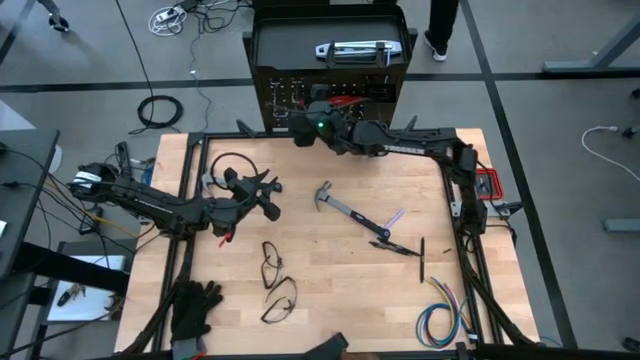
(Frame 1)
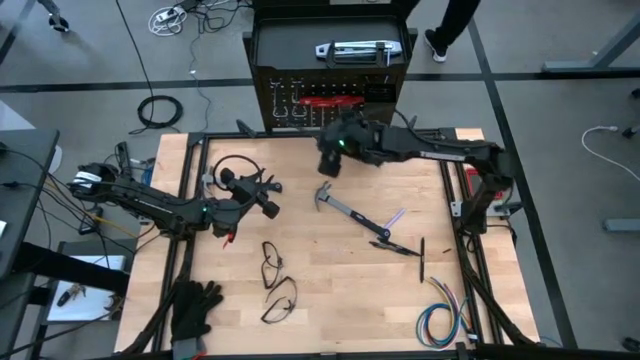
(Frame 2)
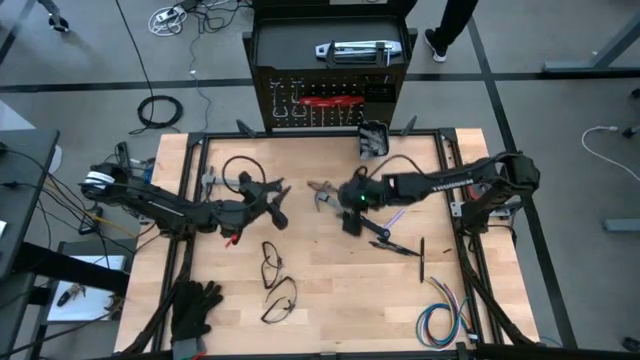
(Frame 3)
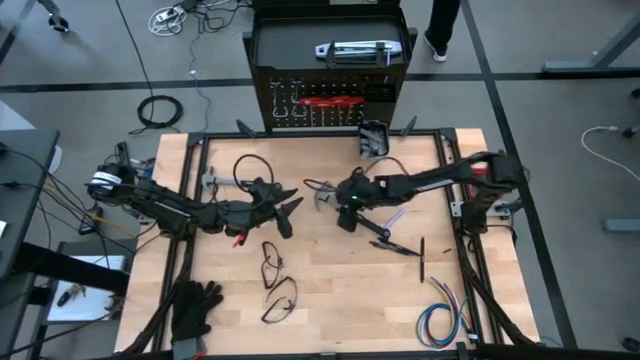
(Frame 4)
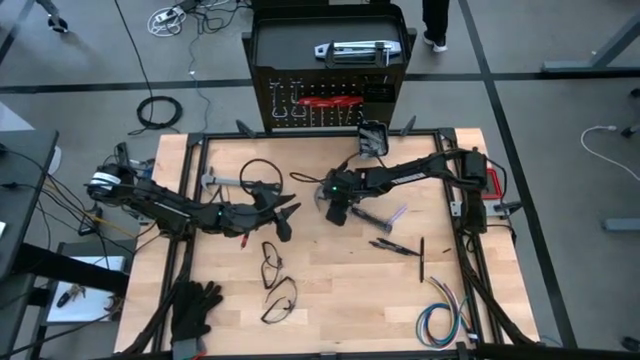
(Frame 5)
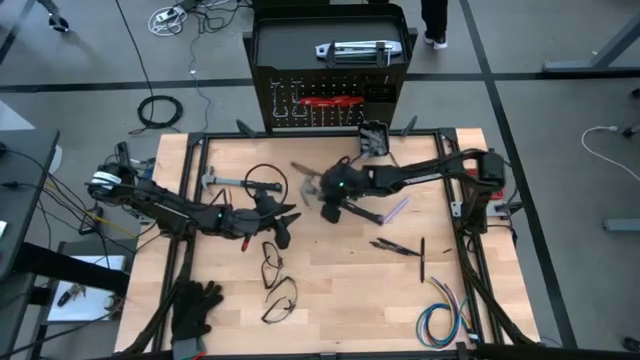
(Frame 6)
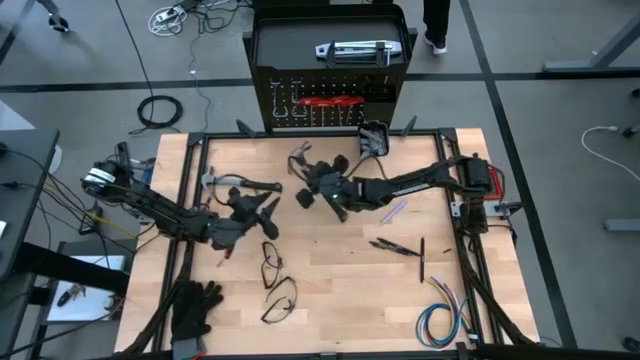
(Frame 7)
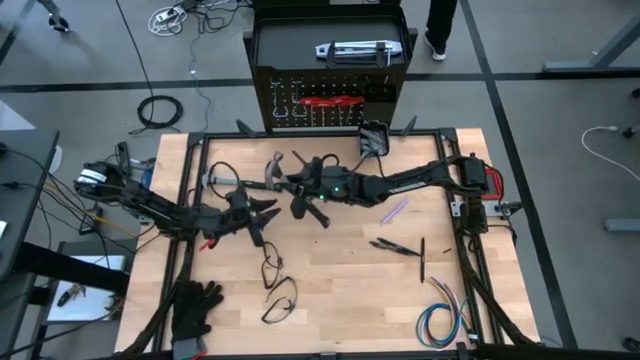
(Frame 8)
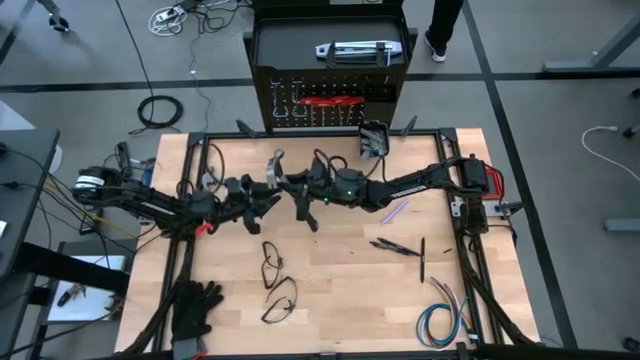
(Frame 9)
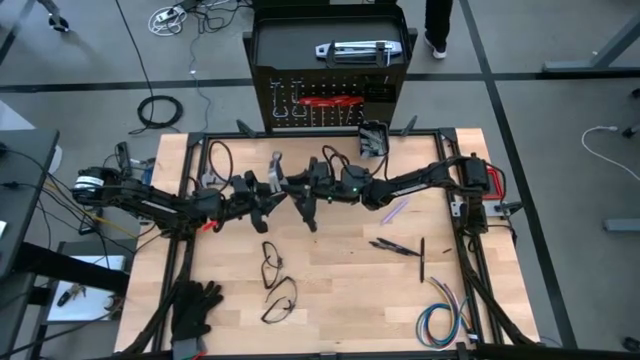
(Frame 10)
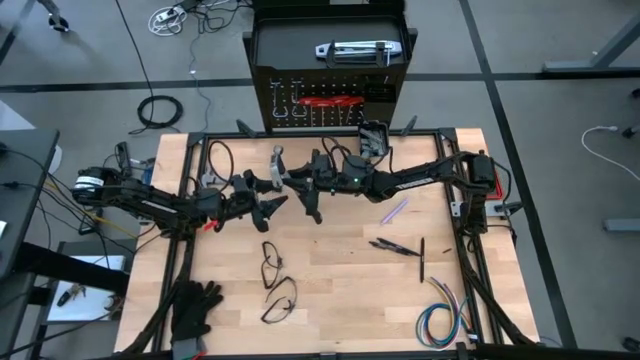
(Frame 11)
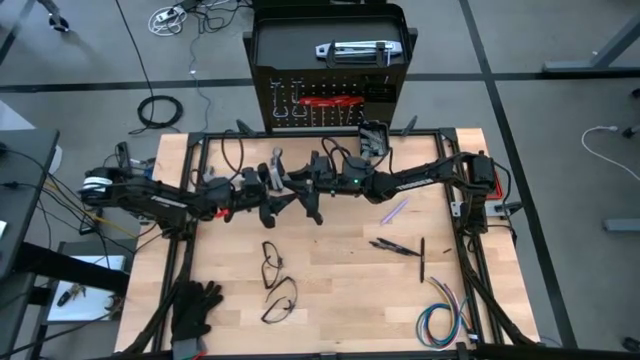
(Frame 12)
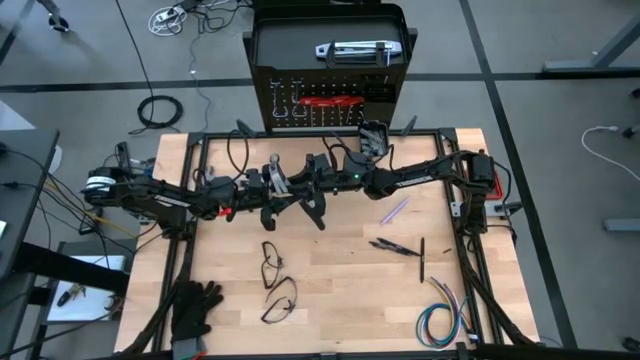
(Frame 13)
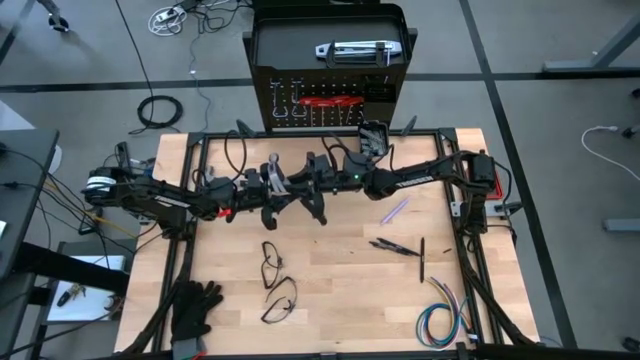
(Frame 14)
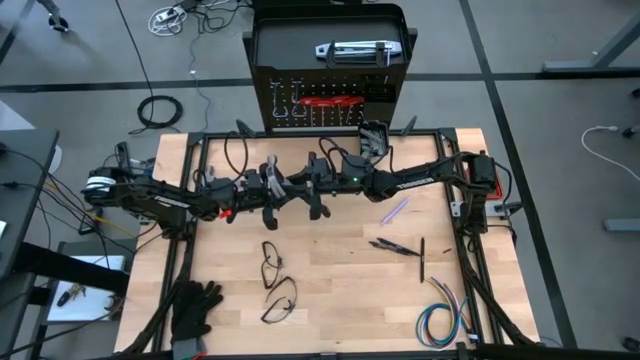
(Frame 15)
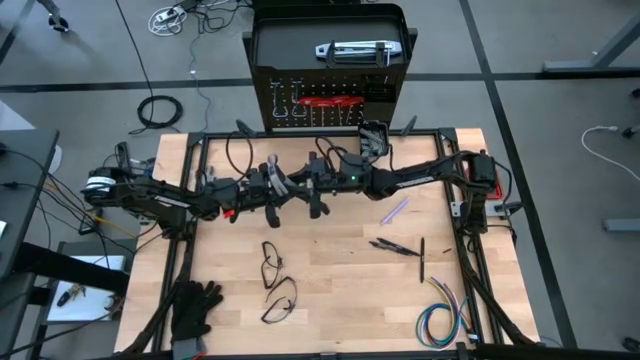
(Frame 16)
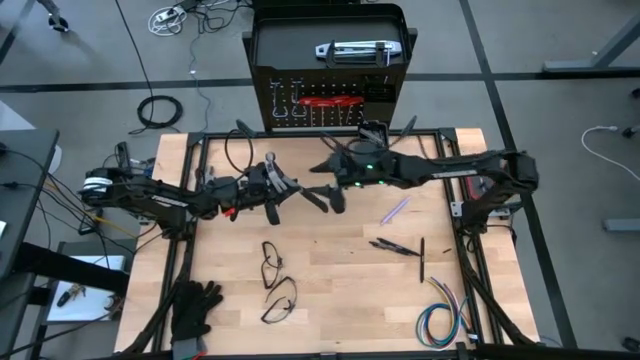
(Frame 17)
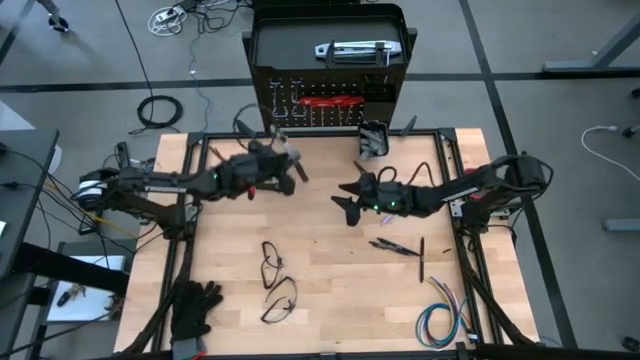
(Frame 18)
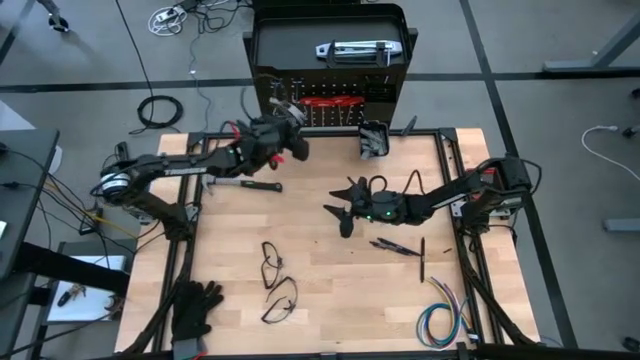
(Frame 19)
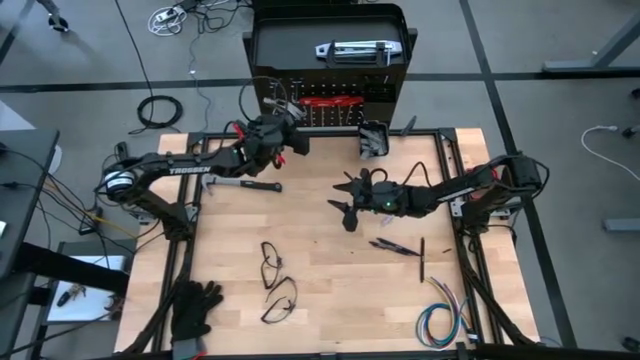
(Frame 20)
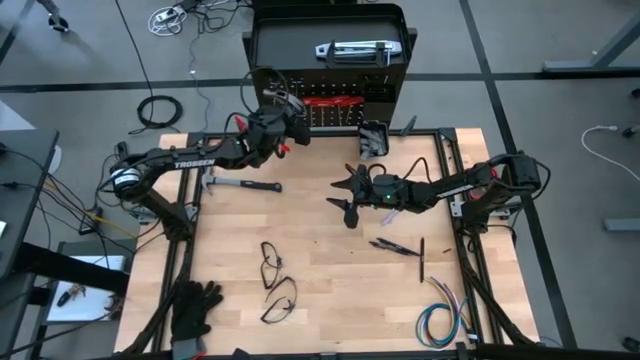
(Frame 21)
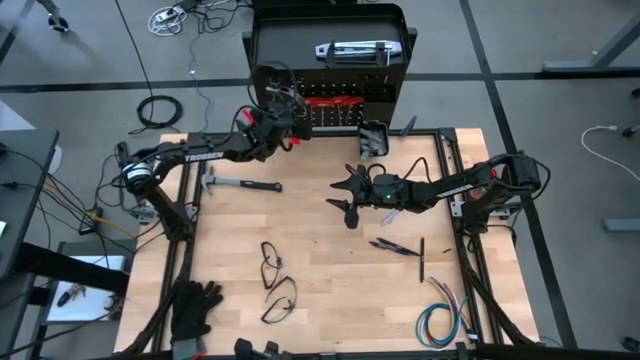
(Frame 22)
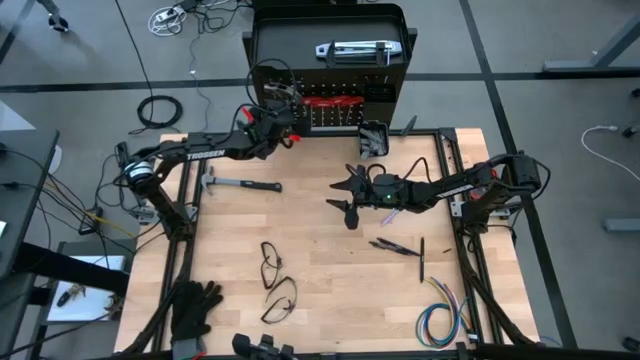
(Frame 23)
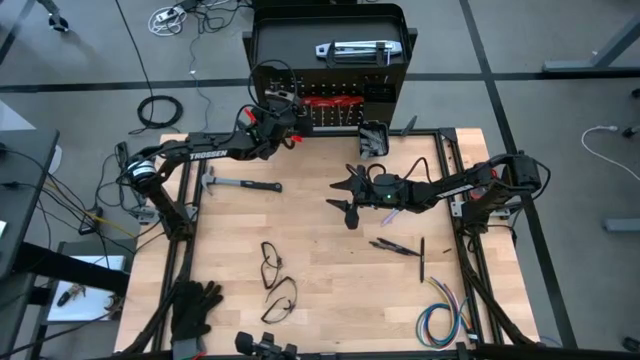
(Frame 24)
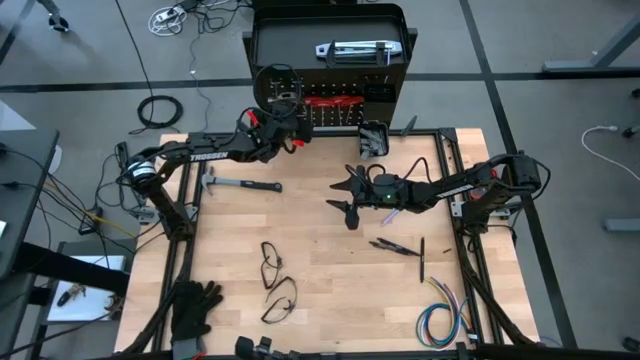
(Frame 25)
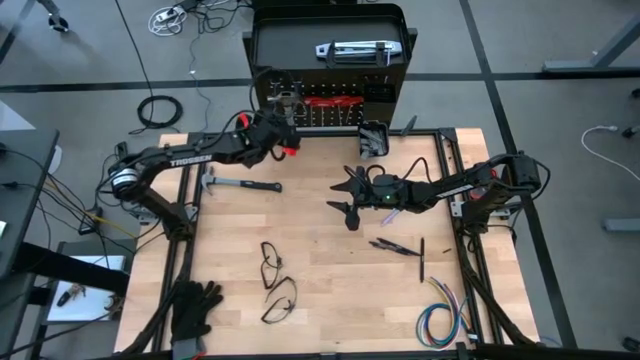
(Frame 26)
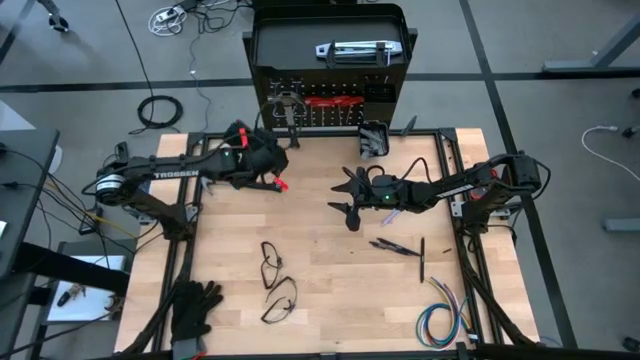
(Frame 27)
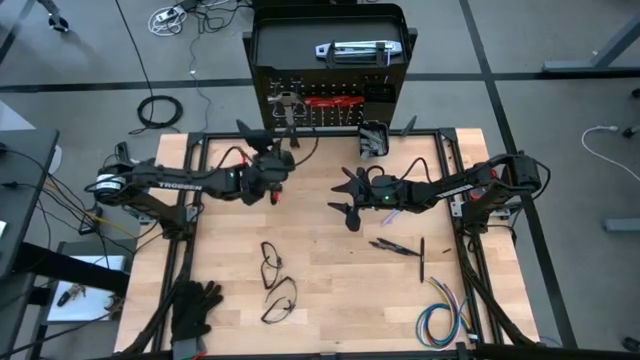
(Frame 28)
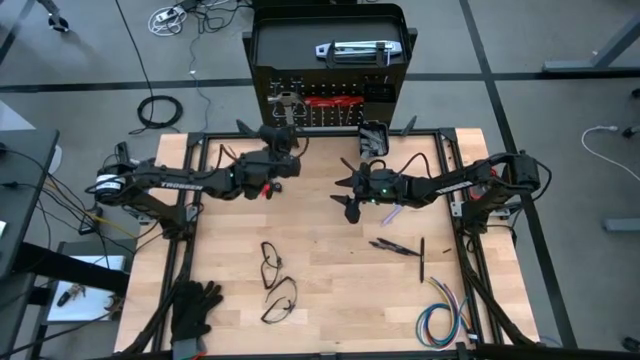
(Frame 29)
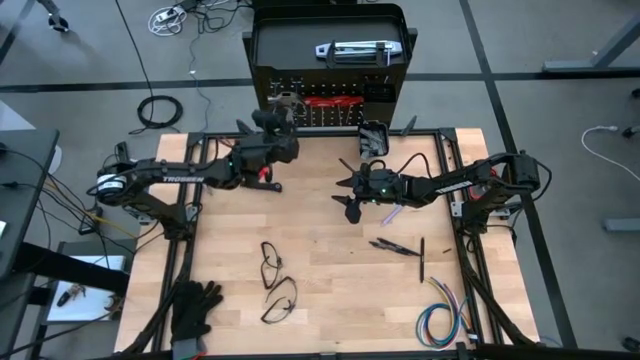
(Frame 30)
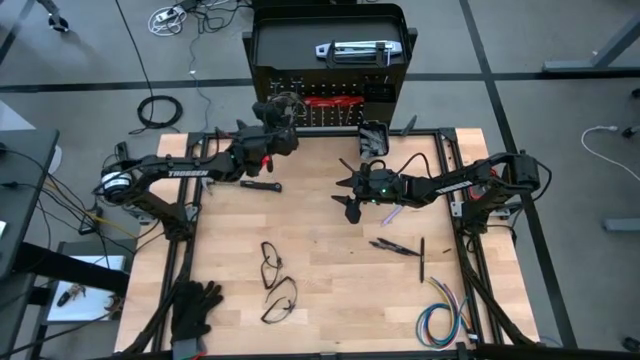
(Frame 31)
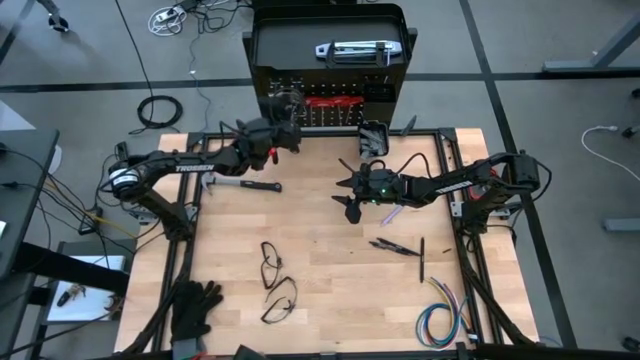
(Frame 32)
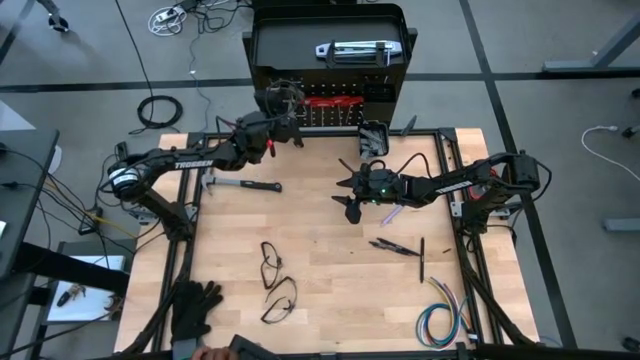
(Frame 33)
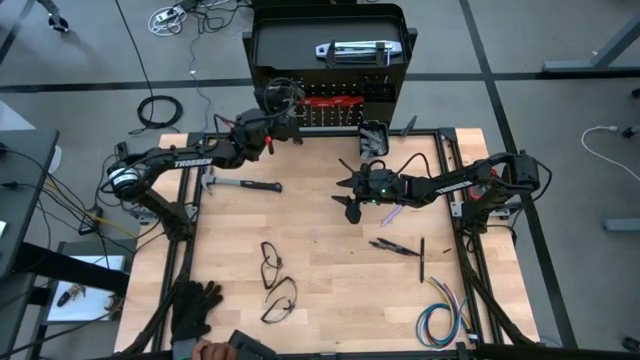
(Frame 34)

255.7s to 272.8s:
Task: Hang tools onto peg board
Hang the right hammer on the pegboard

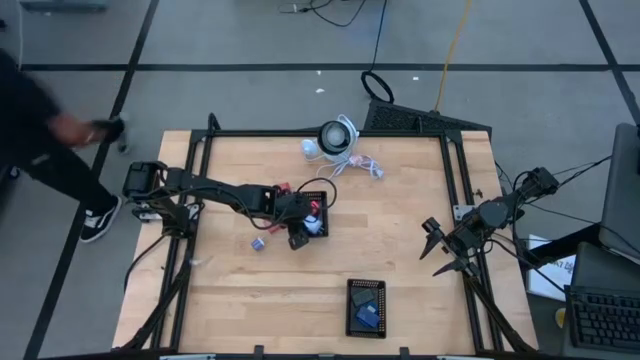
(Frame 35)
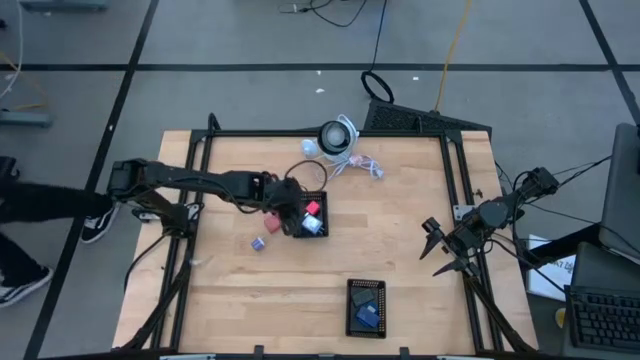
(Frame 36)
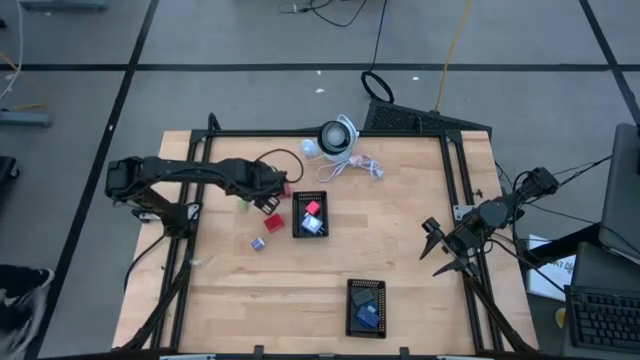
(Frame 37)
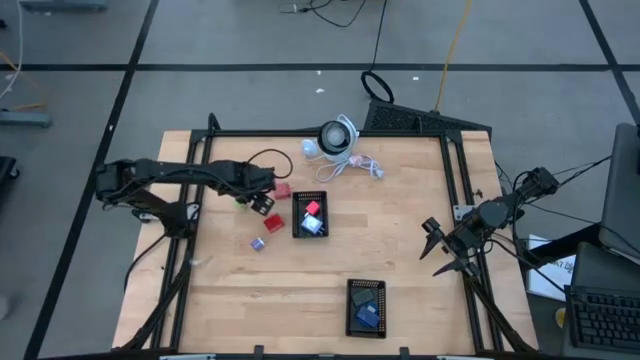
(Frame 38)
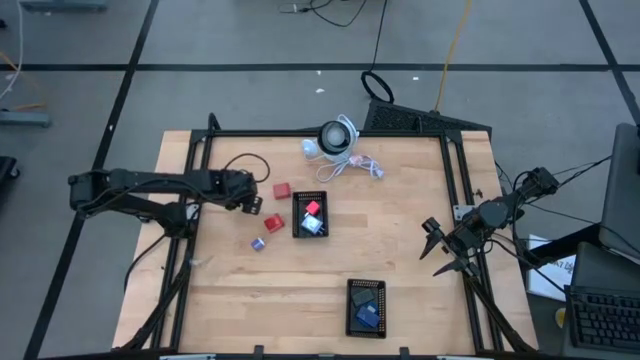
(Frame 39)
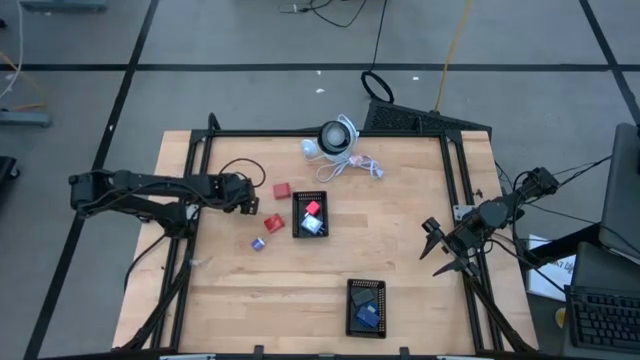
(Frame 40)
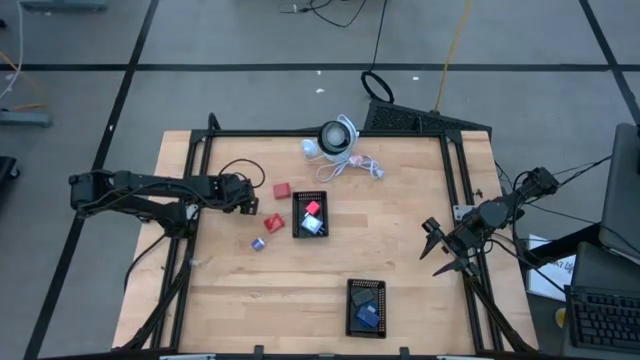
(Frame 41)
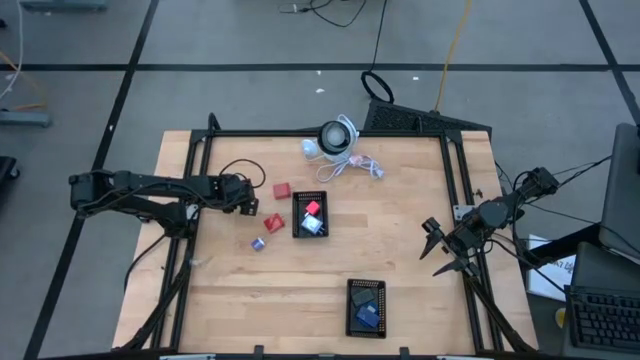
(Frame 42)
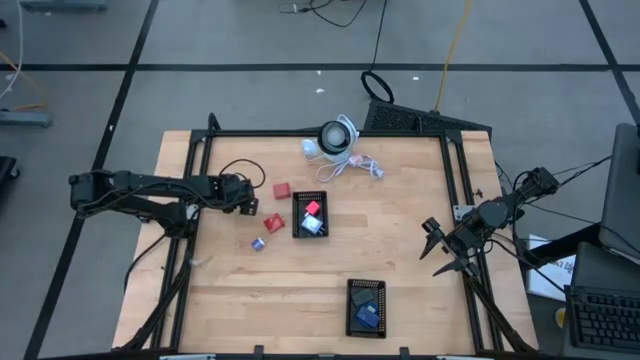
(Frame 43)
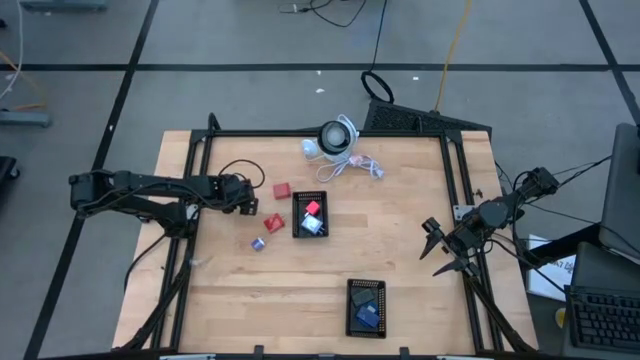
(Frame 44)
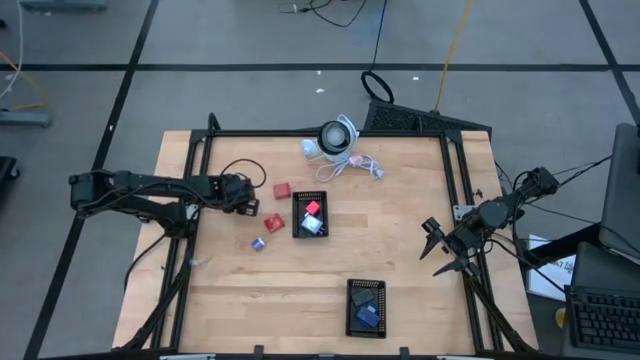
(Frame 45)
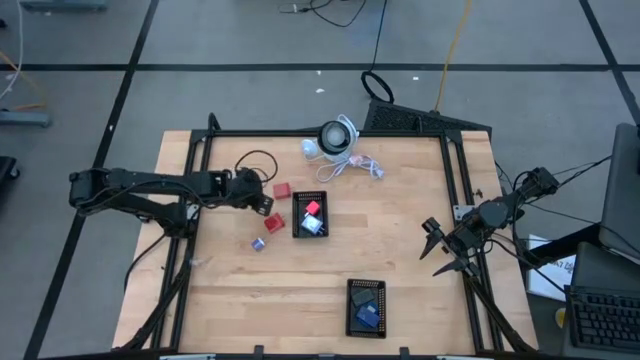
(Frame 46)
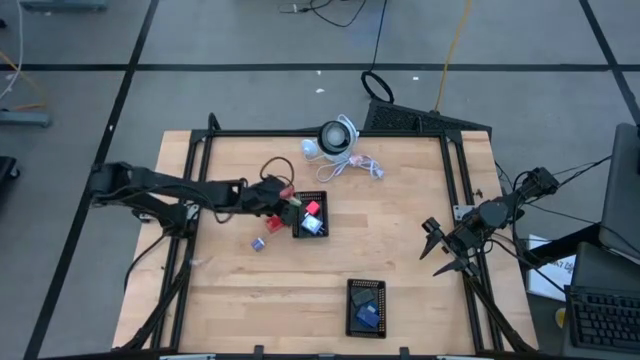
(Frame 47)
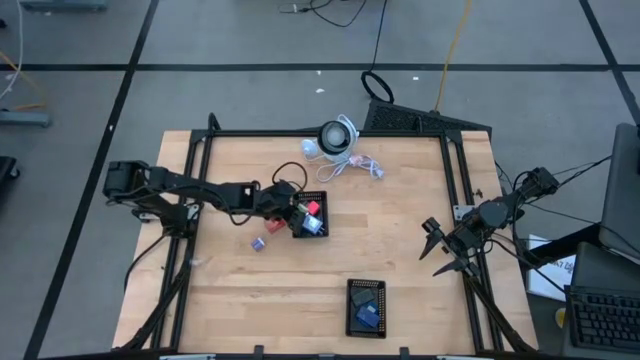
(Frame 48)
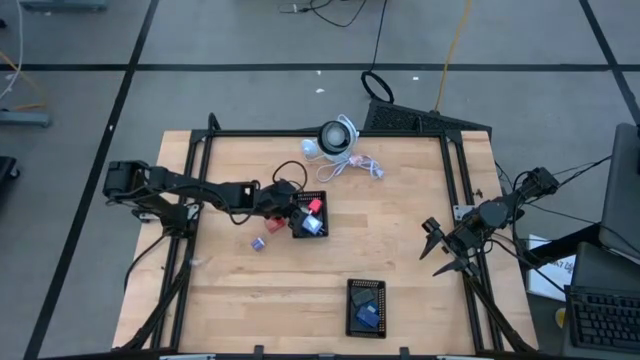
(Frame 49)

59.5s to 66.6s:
Task: Pick & Place Office items
Put the green charger into the top black basket
